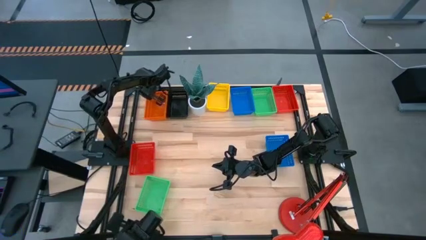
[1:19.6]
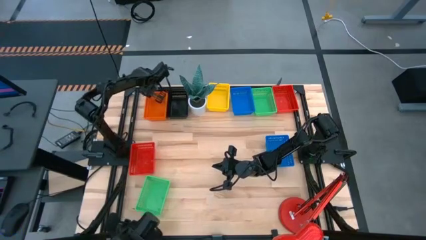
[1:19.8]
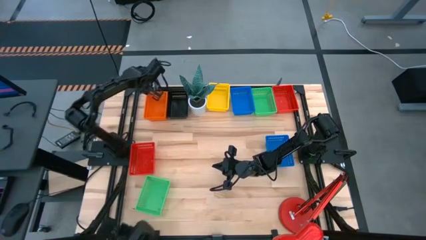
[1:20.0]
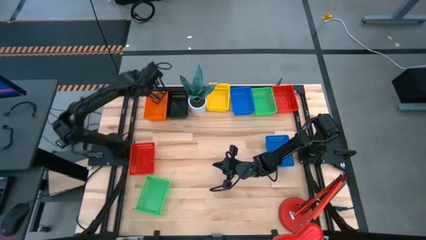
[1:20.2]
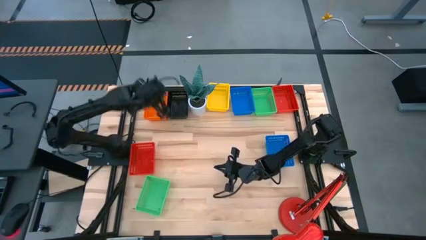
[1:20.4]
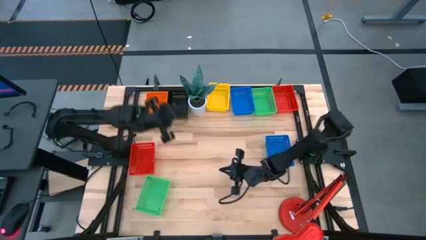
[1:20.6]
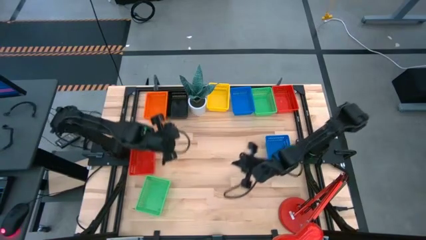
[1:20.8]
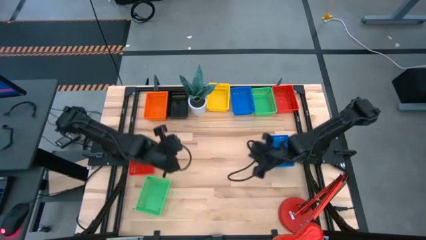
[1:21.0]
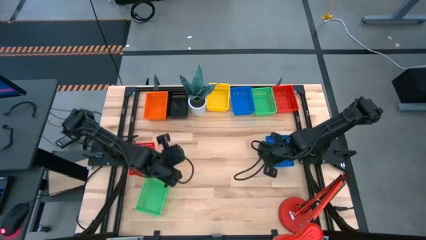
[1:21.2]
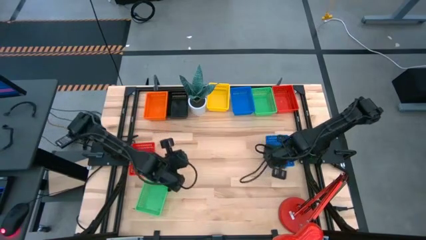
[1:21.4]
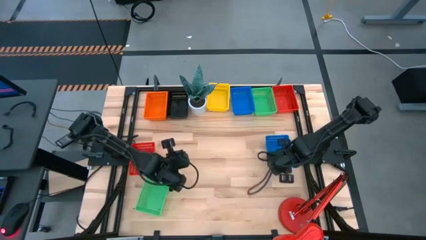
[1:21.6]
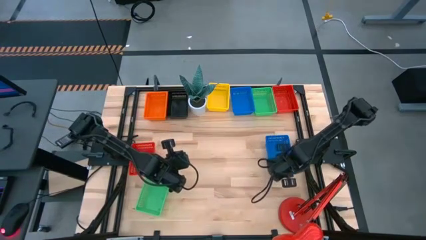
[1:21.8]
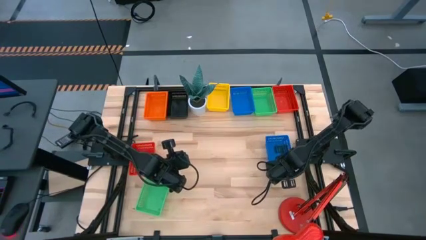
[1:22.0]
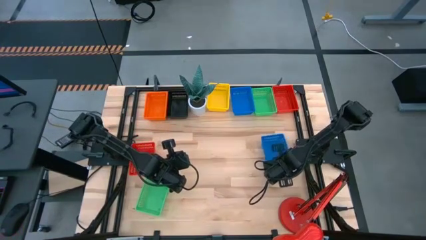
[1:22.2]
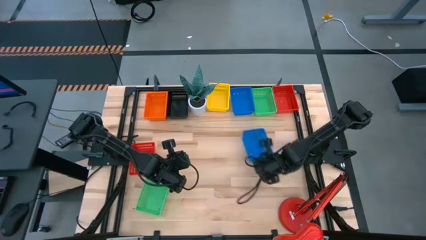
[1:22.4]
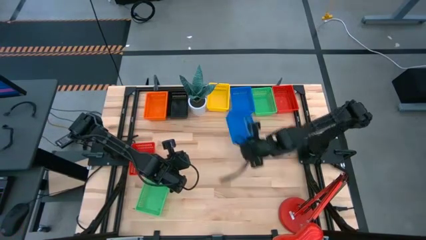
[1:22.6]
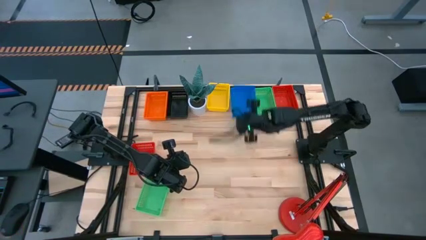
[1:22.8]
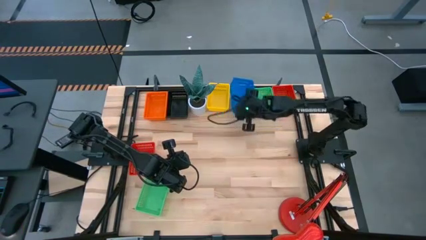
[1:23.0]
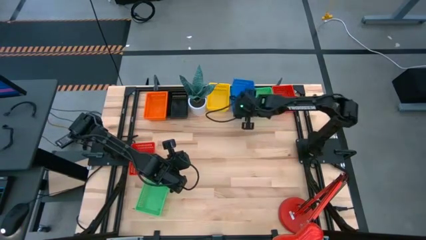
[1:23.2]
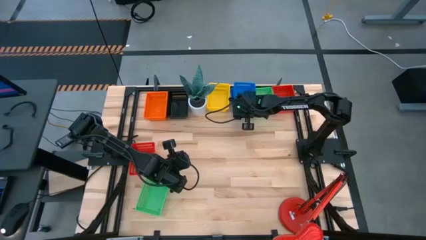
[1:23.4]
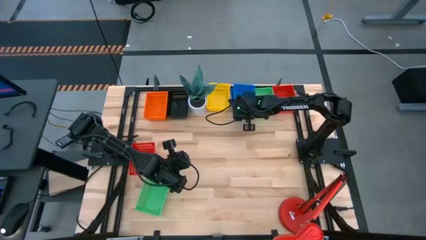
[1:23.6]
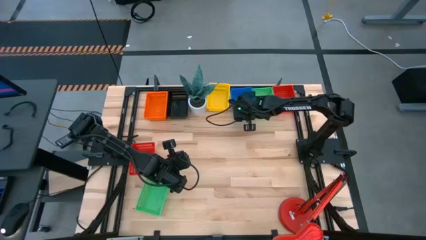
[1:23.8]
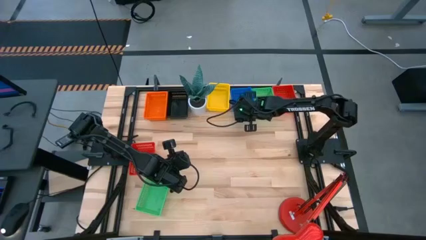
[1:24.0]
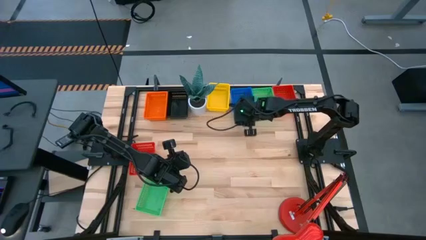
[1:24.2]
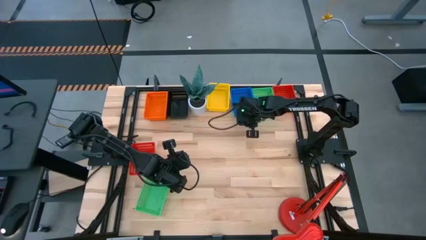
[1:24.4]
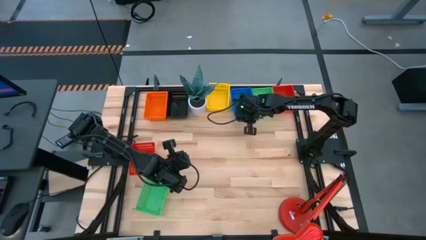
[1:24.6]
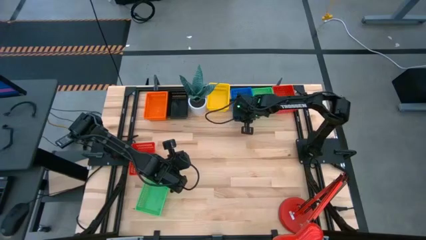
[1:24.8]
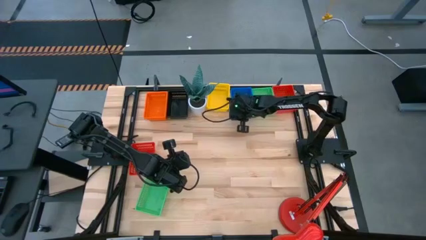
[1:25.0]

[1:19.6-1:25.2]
Stack the bottom blue bin on the top blue bin

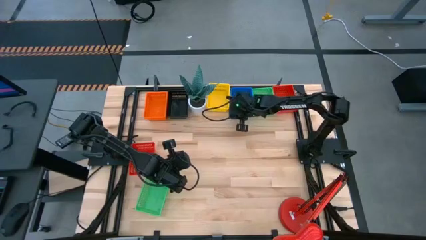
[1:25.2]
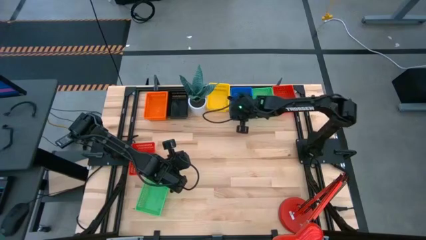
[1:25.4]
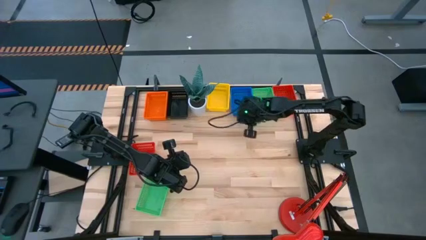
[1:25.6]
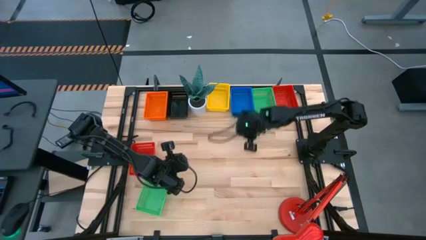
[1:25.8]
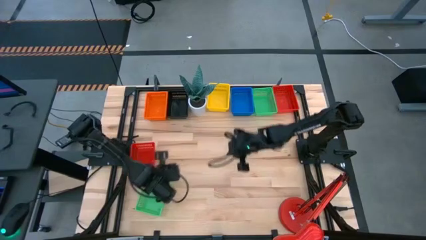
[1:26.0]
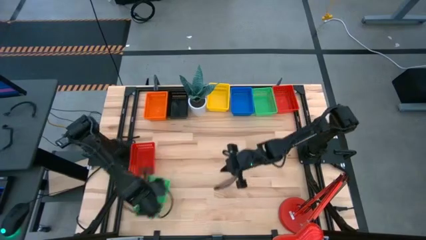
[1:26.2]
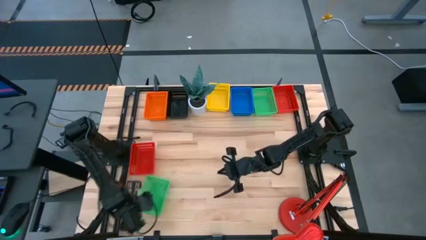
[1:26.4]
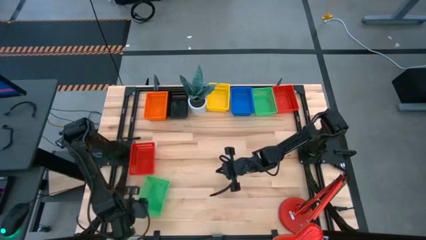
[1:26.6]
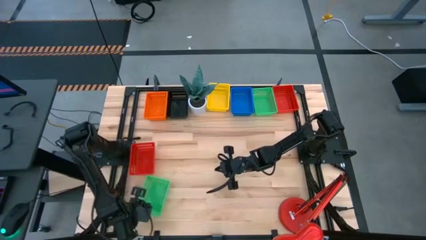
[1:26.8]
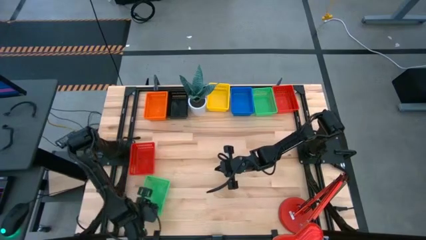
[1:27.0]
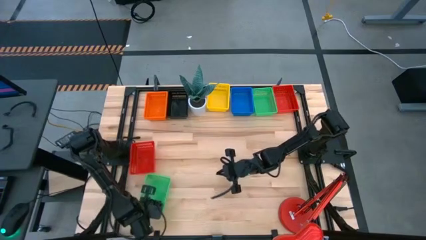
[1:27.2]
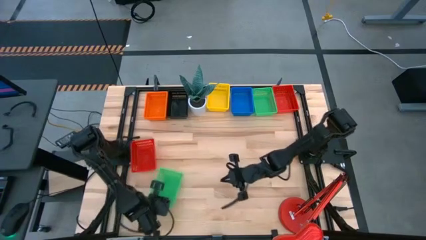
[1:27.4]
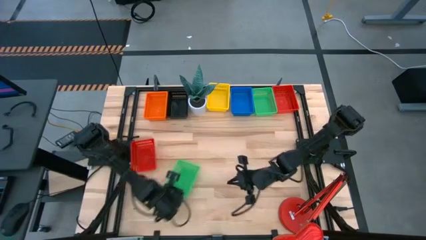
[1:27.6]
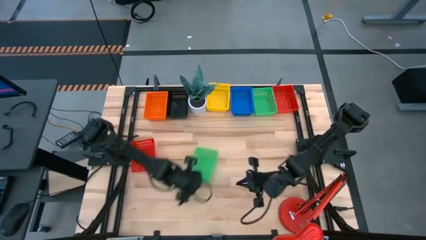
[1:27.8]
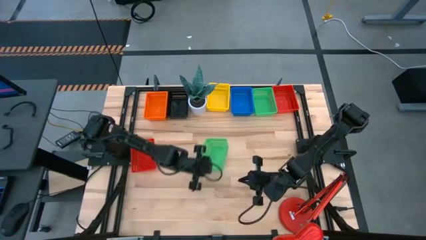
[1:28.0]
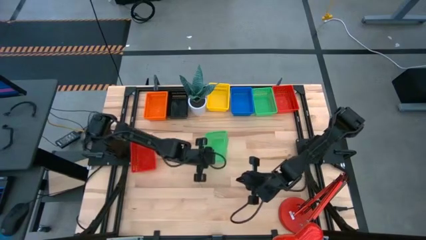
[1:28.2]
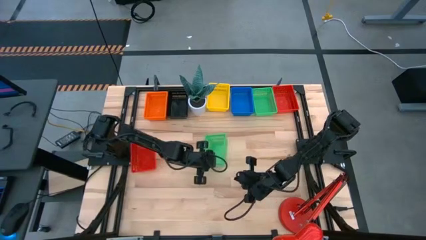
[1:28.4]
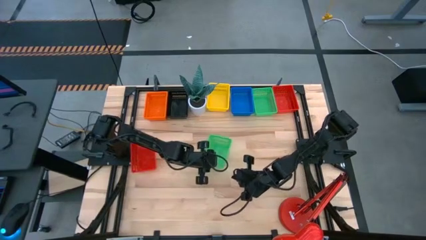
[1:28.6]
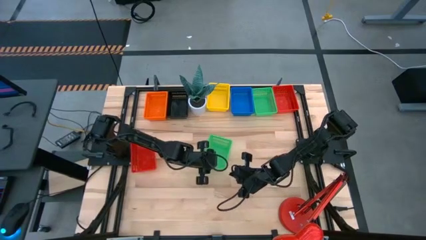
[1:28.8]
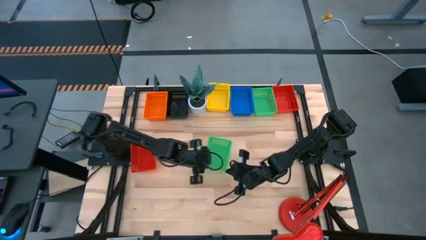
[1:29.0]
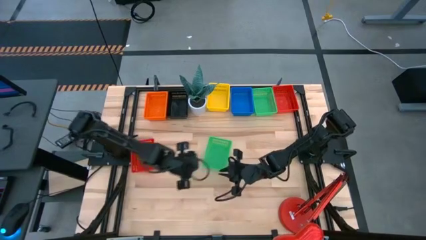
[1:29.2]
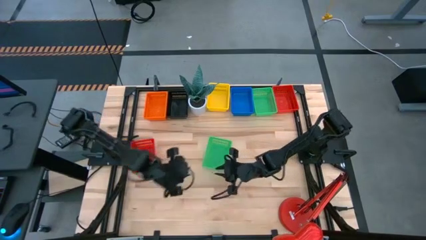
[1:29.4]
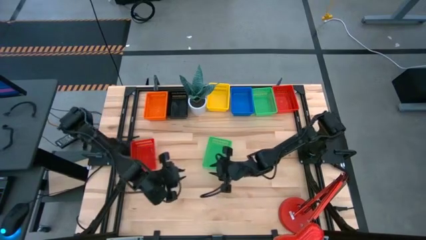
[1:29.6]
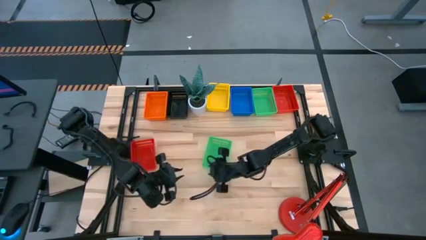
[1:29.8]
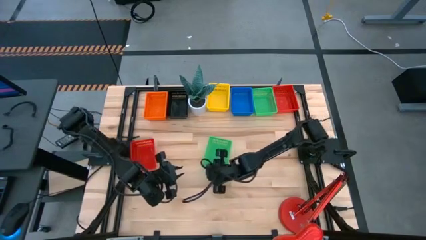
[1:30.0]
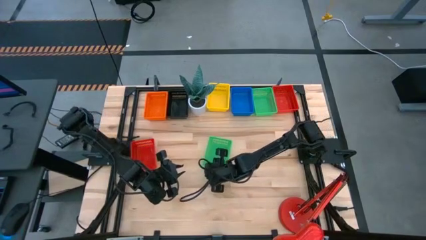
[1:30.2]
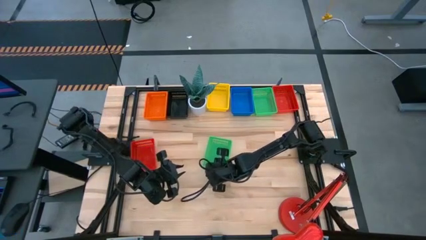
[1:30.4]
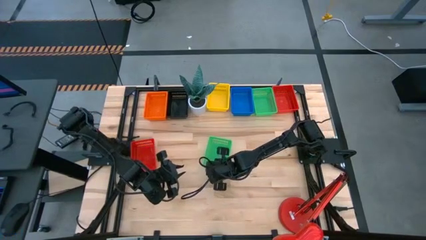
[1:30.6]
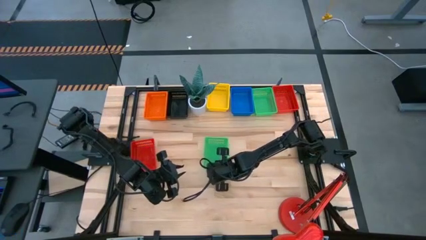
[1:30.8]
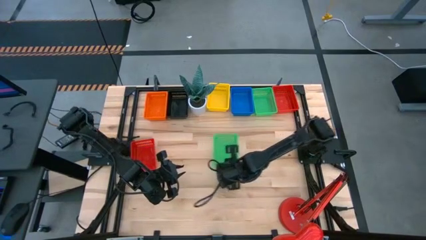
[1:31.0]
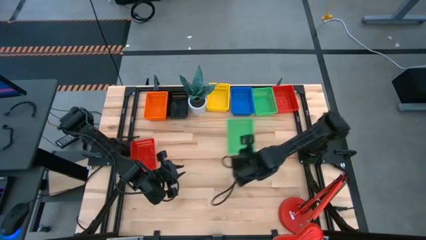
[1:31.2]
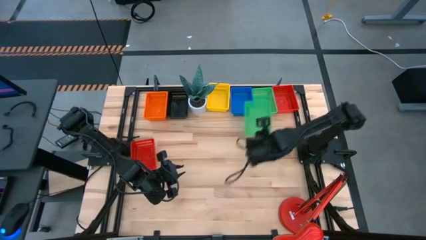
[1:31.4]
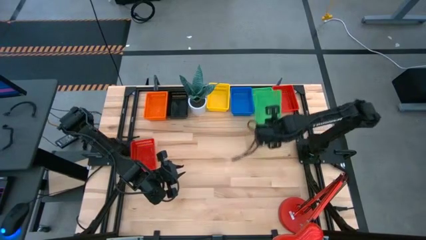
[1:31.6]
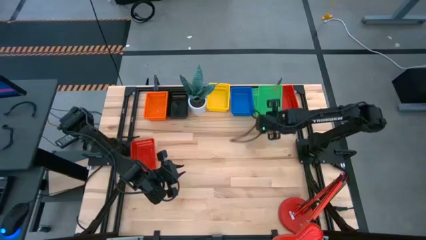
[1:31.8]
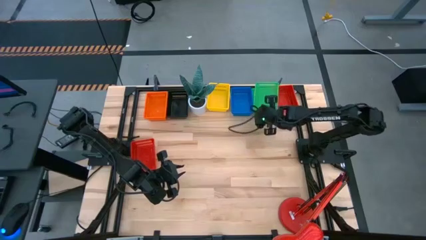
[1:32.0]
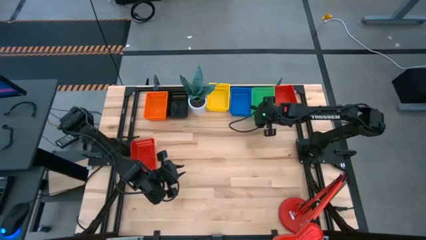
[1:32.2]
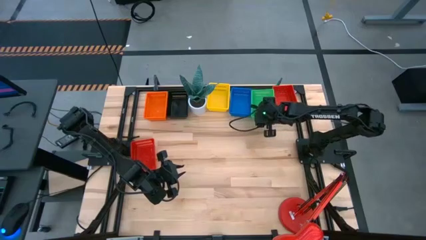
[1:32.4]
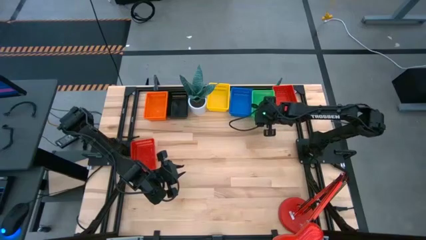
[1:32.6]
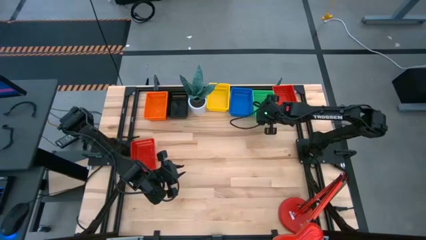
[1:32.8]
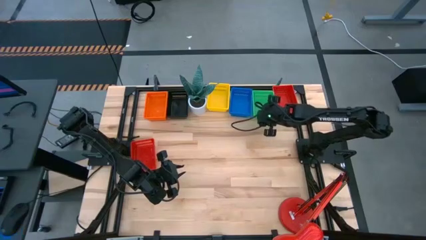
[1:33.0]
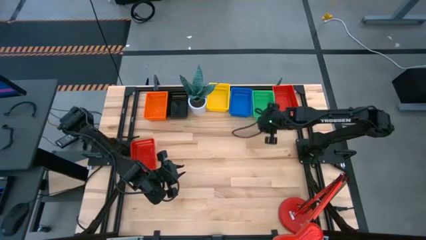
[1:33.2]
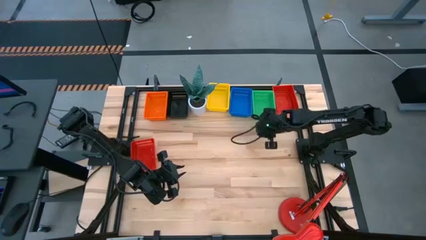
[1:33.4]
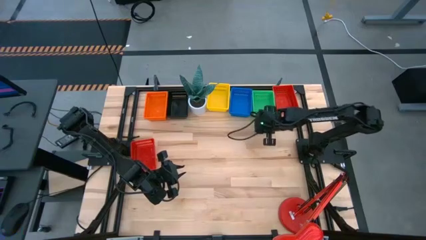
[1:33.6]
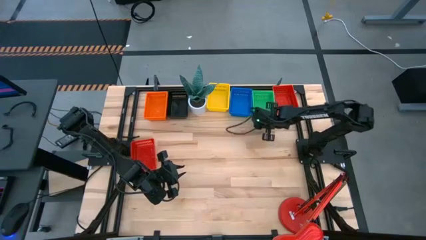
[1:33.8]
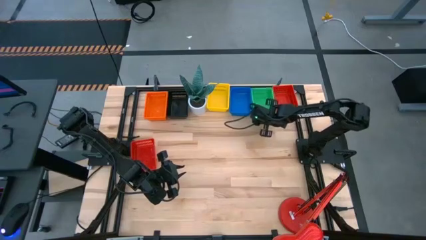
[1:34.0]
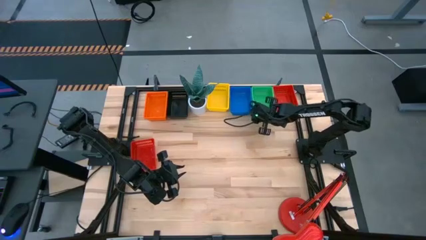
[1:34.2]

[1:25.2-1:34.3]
Stack the bottom green bin on the top green bin

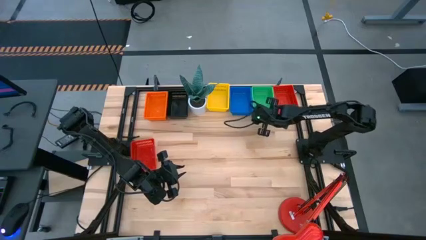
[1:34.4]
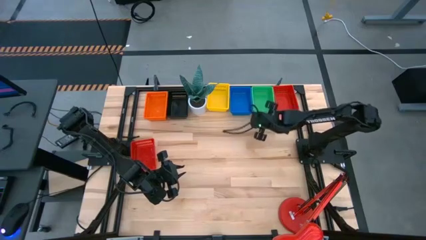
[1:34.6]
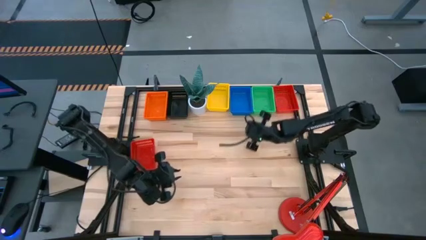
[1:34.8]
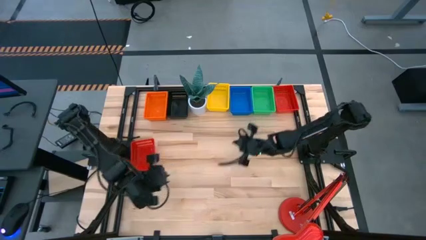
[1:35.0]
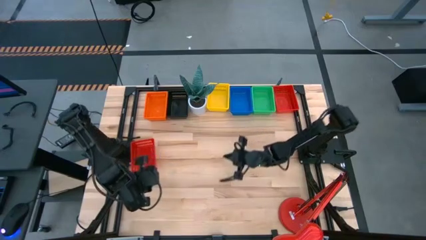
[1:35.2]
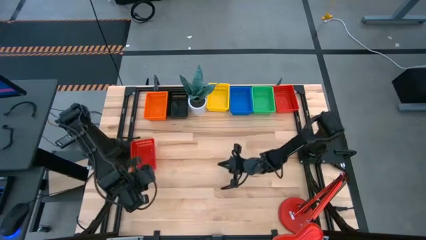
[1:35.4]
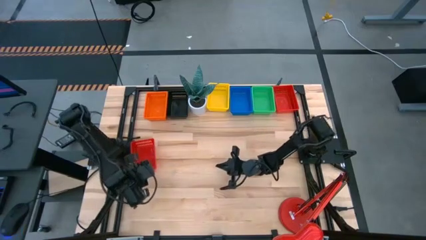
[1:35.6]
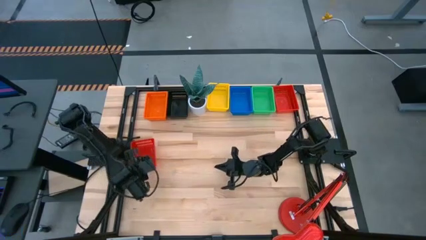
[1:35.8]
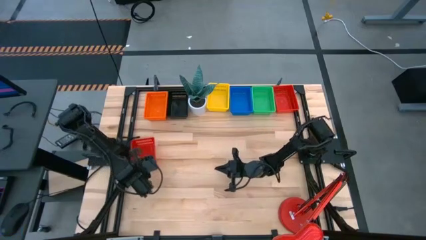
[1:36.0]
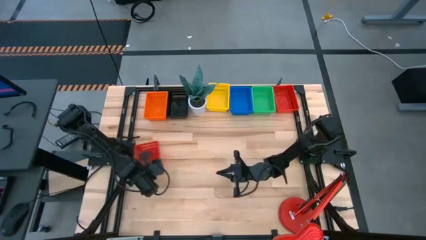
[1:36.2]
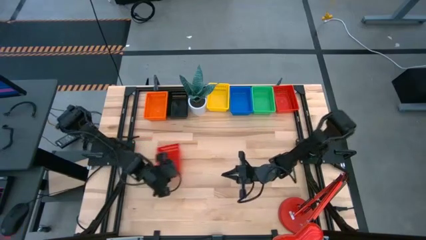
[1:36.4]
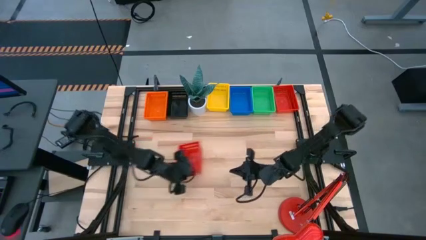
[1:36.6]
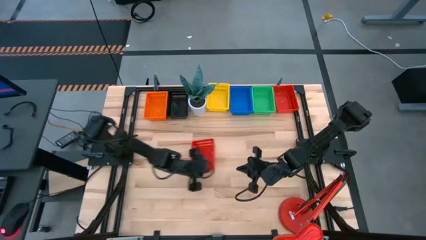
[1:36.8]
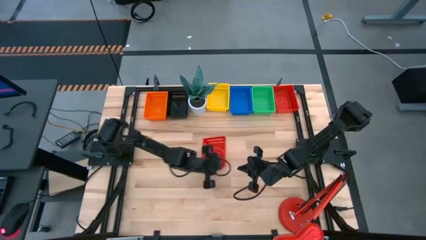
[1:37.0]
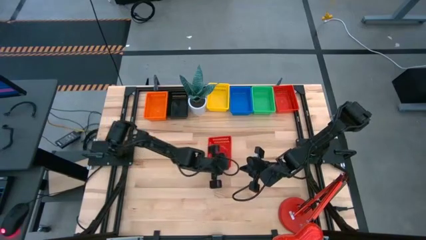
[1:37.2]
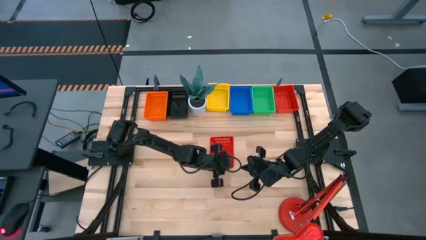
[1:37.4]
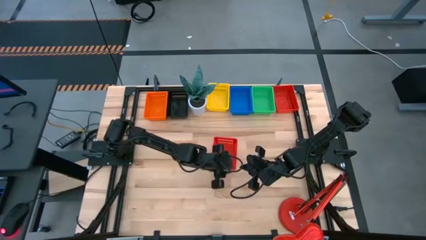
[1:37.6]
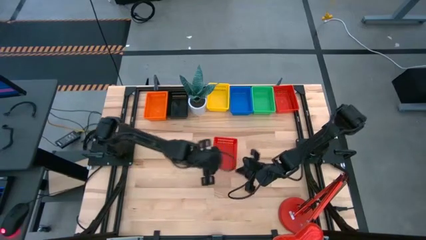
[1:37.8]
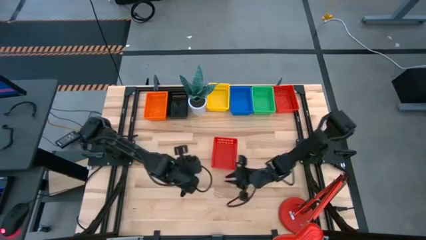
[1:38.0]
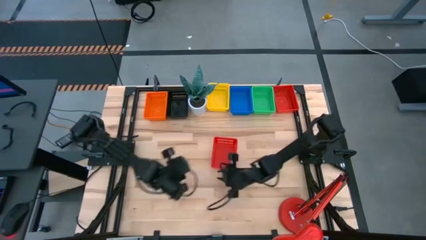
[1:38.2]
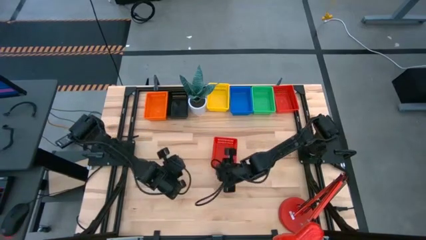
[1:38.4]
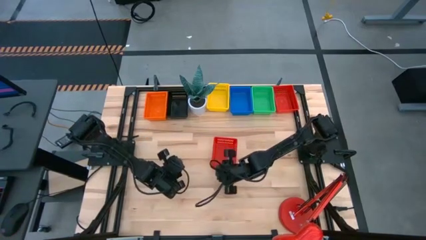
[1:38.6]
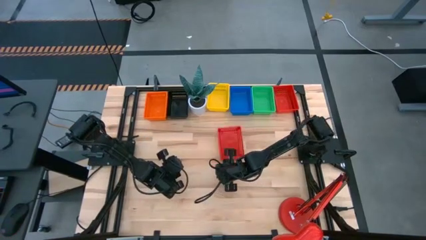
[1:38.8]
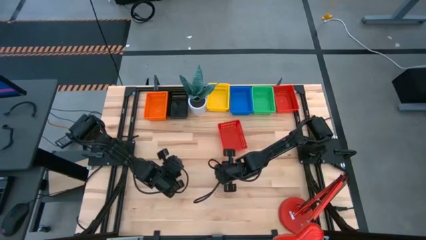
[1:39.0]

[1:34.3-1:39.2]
Stack the bottom red bin on the top red bin
